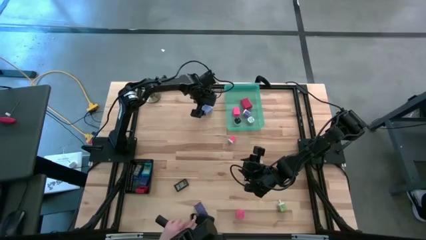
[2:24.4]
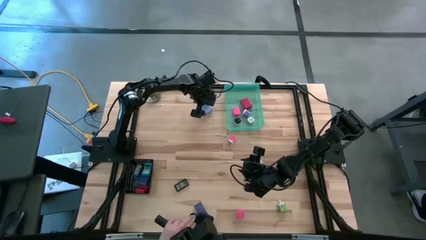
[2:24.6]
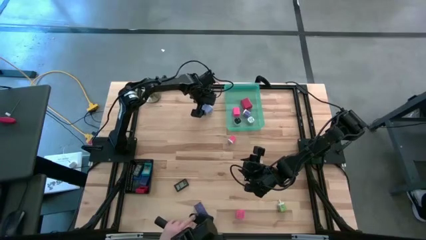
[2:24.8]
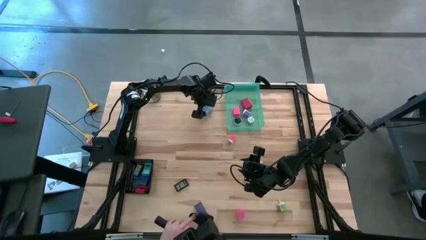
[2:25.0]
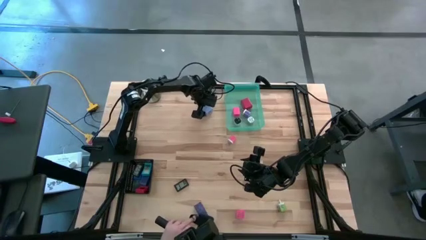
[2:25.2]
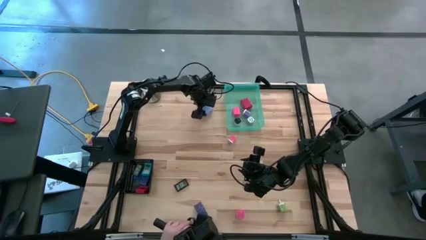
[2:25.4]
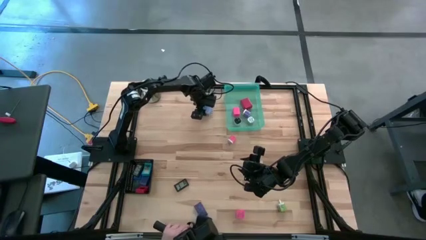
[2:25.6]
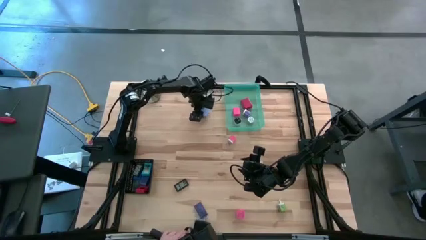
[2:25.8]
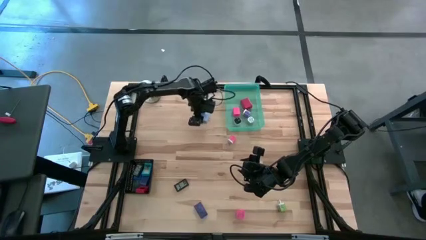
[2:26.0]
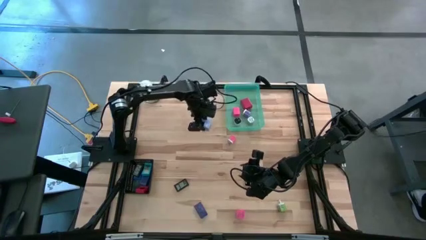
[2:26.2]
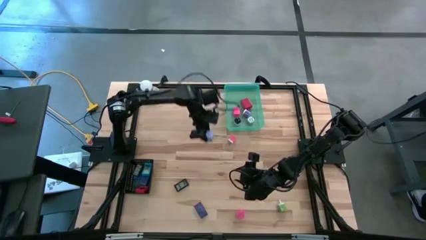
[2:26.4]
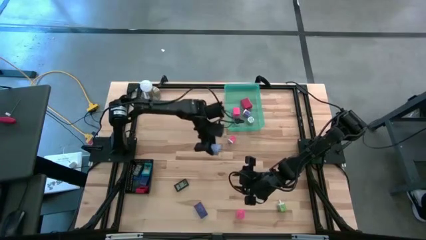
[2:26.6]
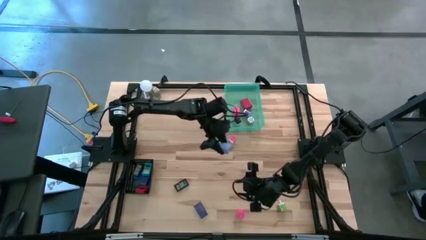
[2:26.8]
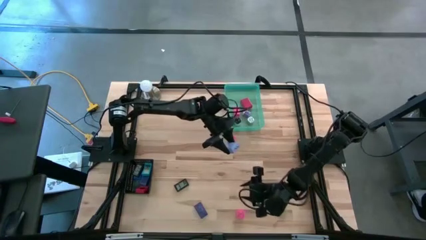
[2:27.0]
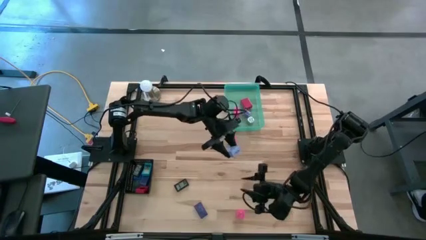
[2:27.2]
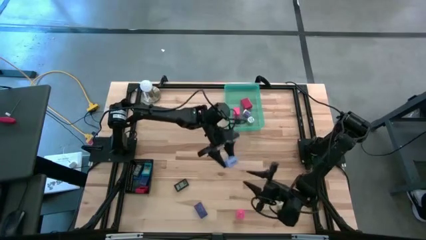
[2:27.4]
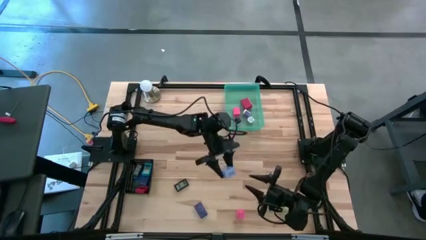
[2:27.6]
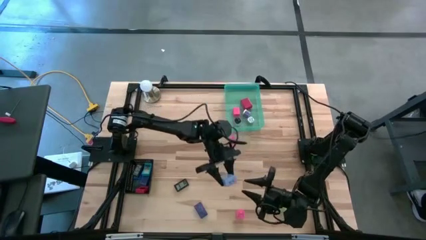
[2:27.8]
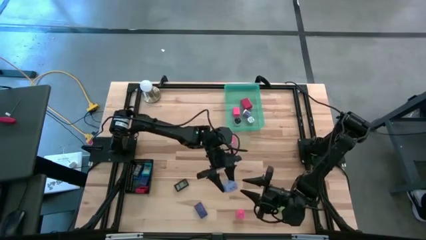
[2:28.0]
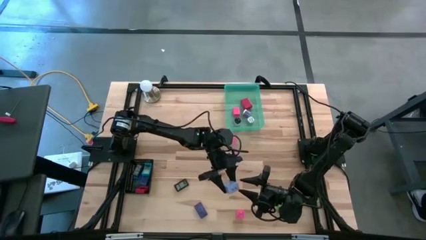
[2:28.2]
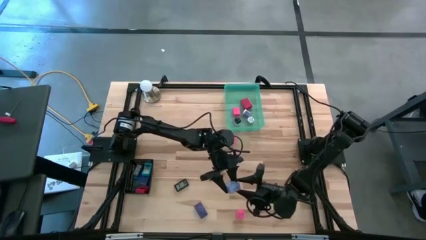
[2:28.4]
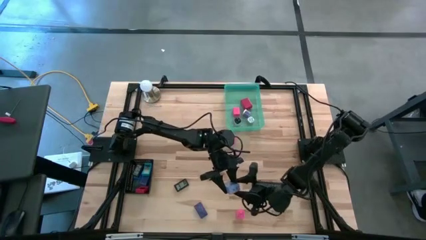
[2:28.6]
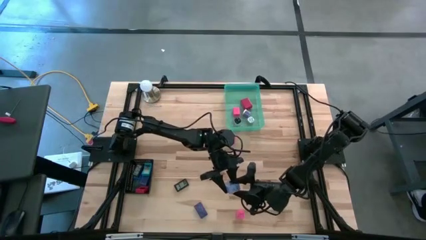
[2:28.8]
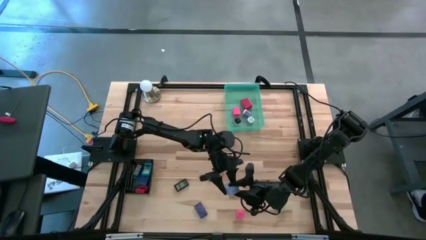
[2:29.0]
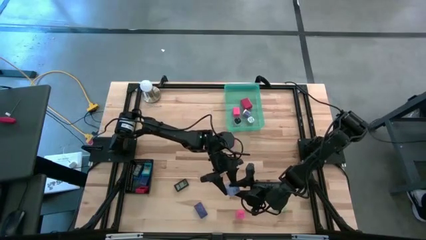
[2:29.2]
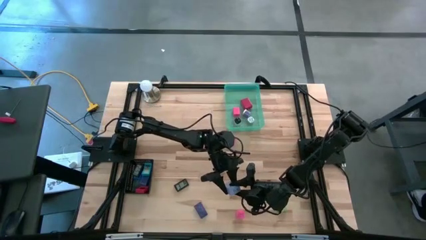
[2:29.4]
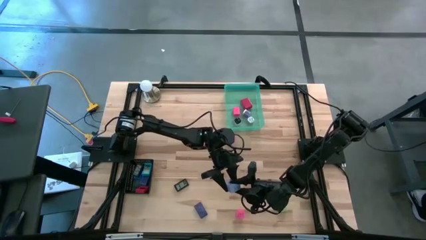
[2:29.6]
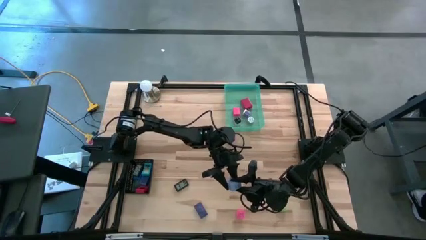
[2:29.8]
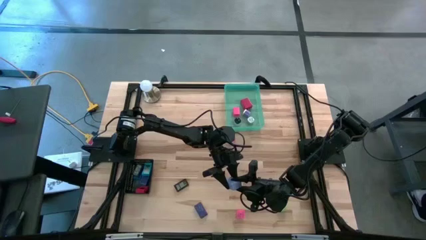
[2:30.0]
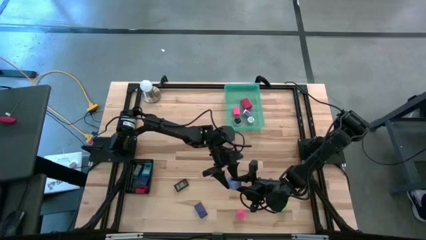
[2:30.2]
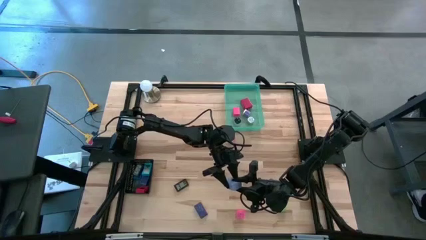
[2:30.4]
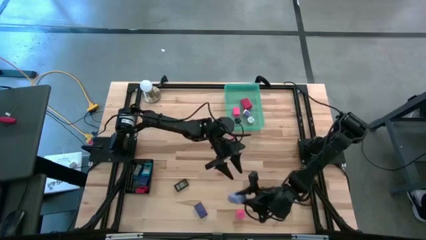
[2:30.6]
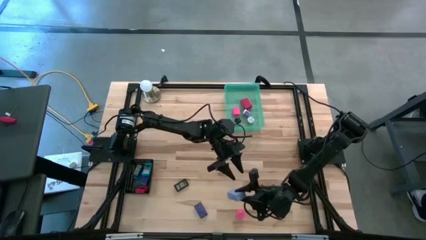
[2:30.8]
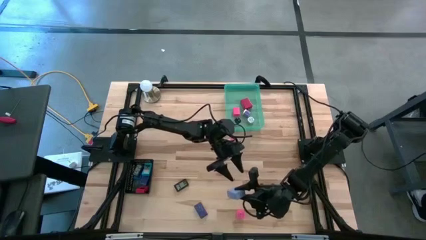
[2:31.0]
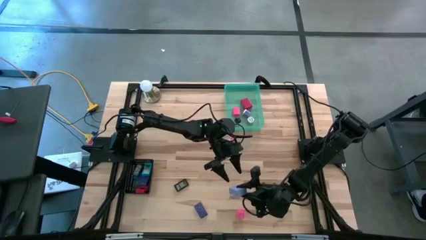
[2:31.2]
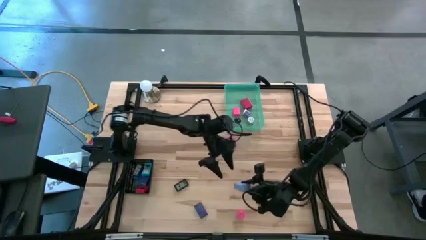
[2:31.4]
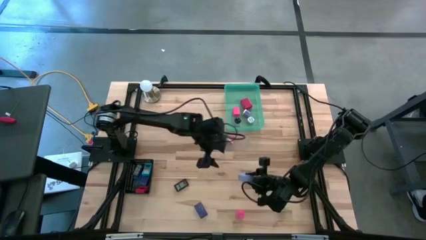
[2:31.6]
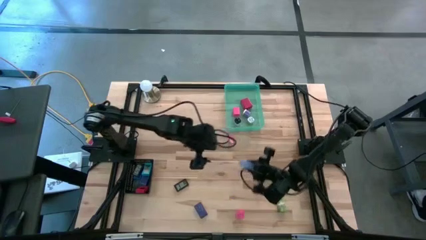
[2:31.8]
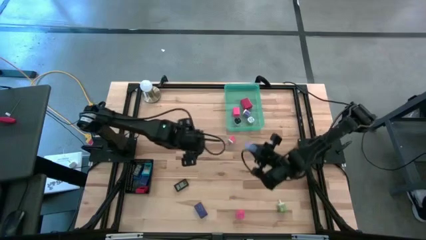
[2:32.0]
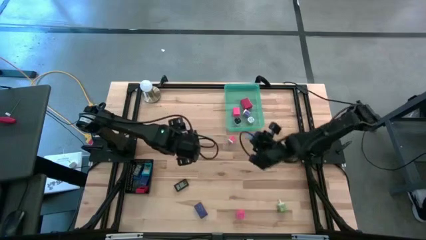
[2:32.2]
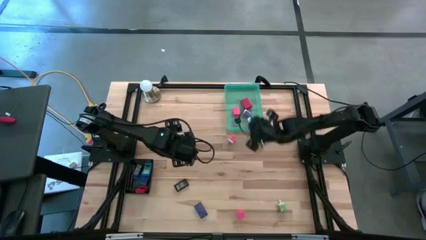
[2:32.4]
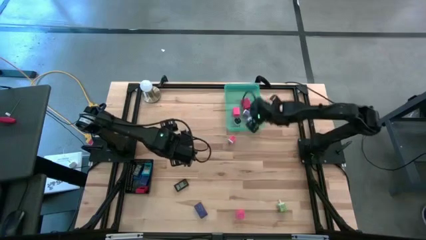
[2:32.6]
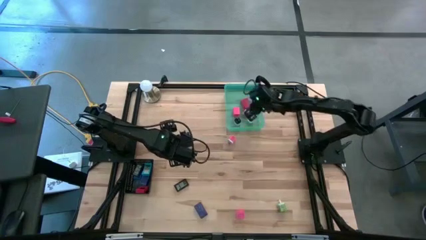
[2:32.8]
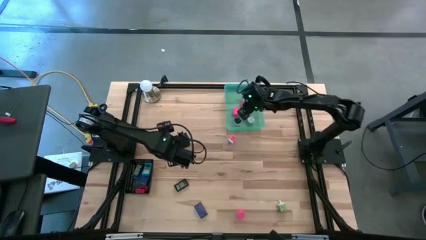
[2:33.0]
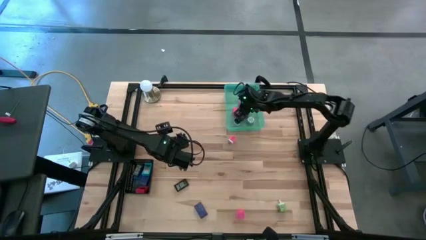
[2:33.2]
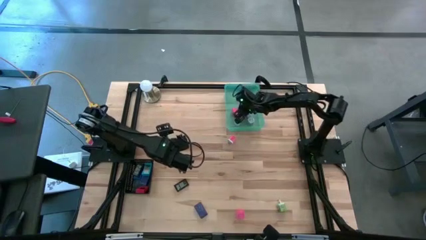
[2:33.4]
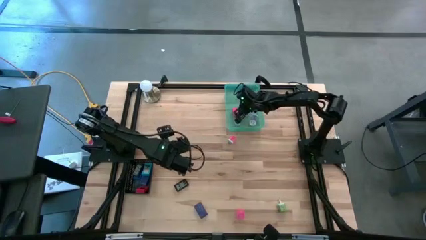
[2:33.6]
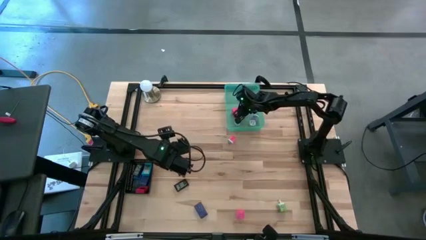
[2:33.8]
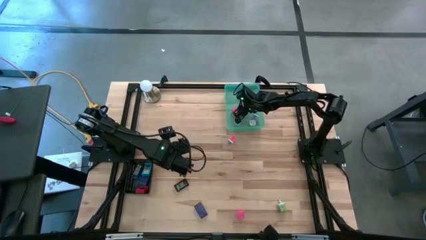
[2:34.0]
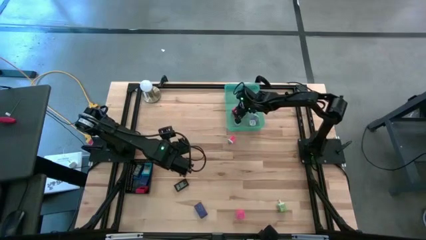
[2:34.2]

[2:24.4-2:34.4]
Task: Pick & Place Office items
Put the purple charger adapter into the green bin
